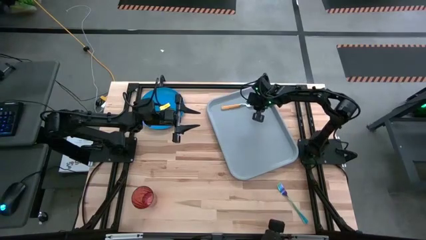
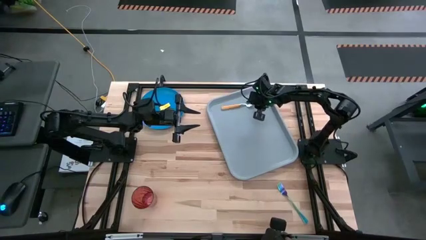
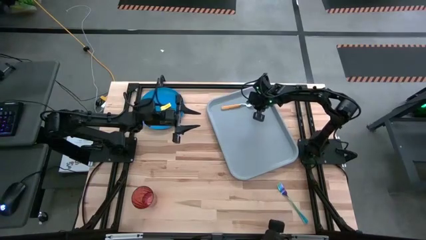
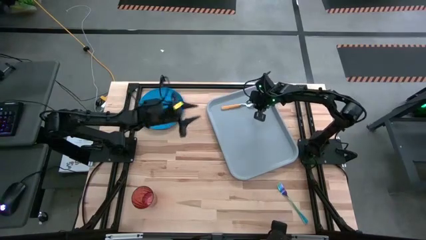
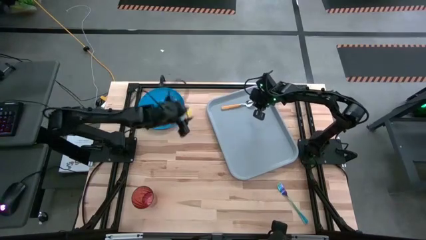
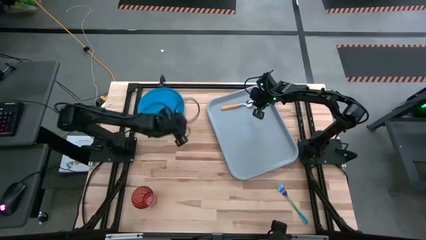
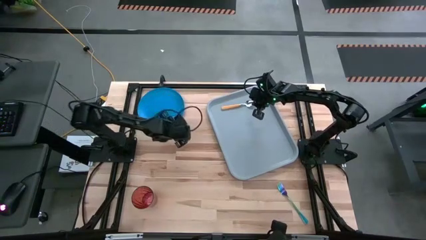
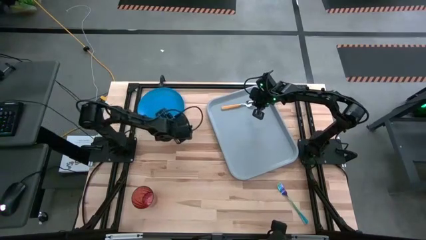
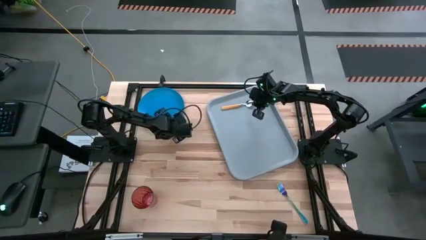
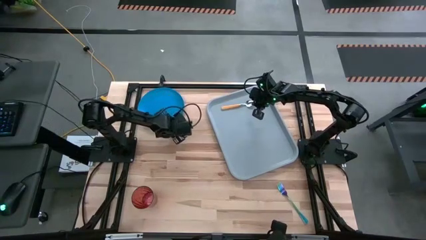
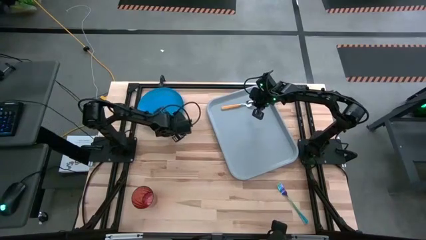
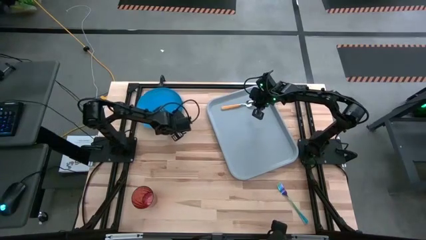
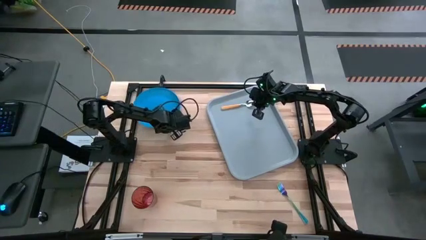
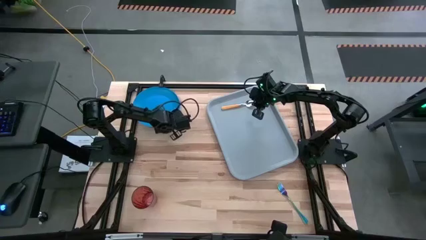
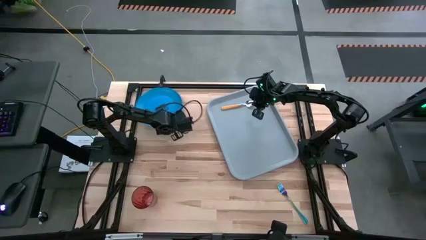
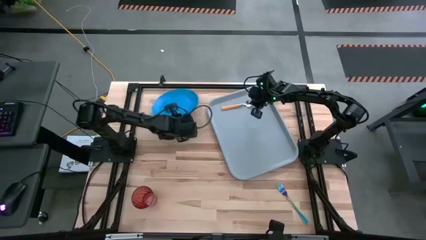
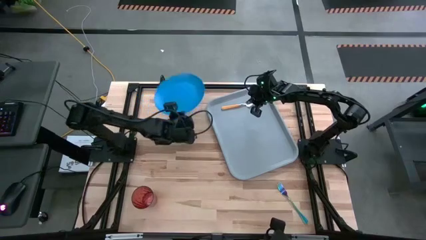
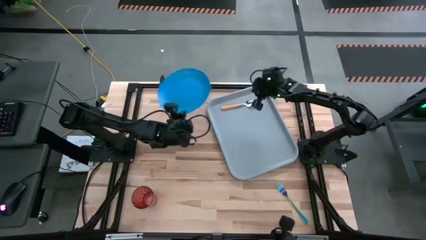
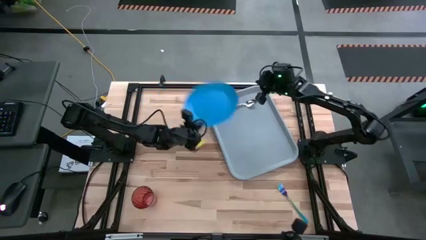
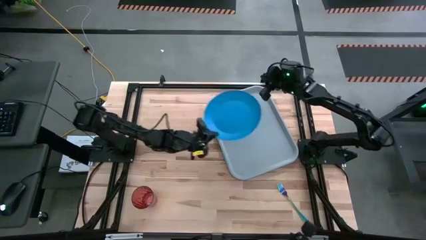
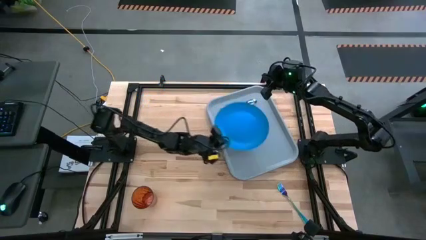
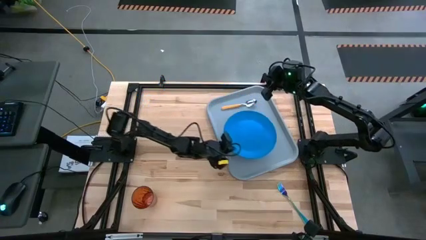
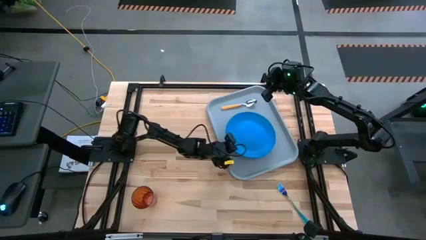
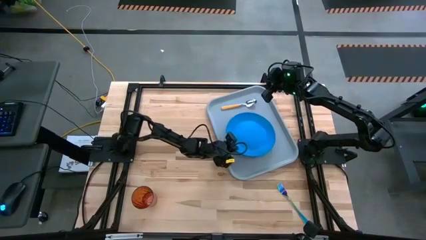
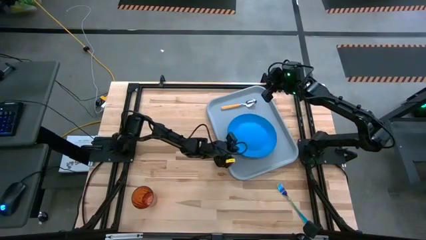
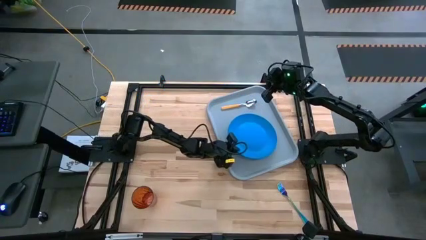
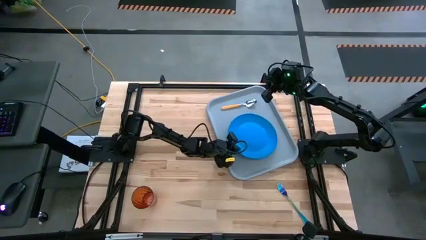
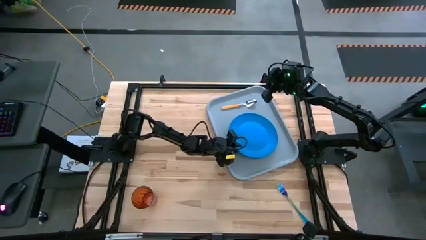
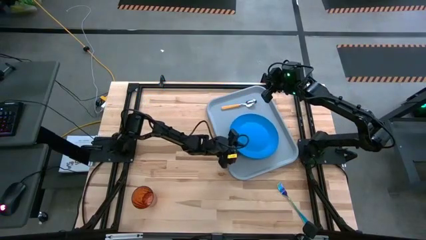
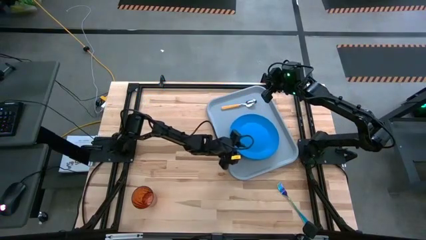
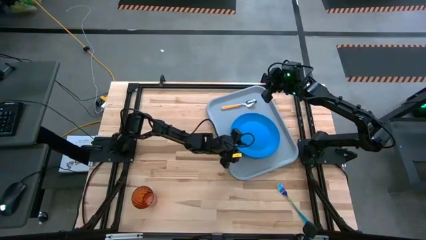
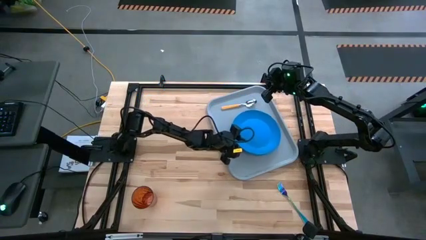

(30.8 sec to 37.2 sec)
Task: Pick and place plate/cup/fork/spoon on tray
Put the blue plate on the gray serving tray

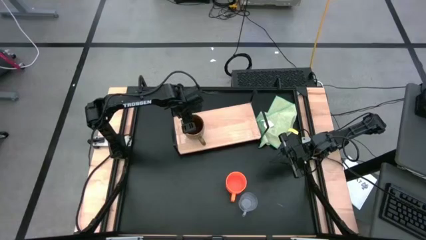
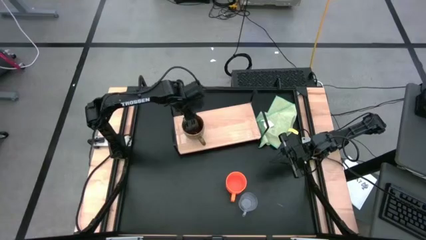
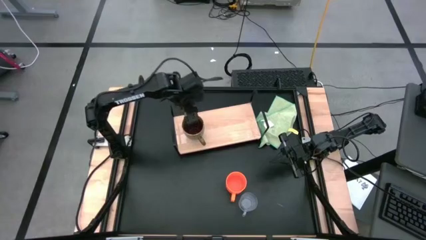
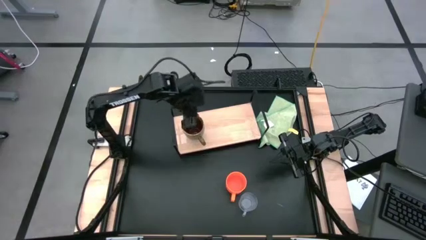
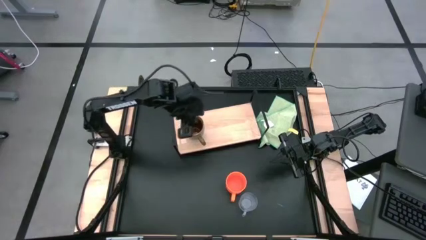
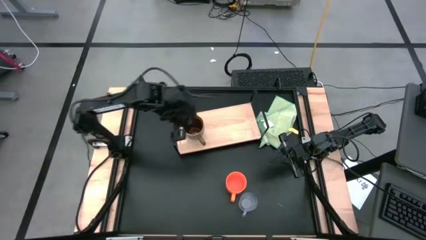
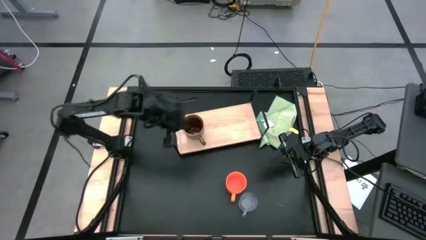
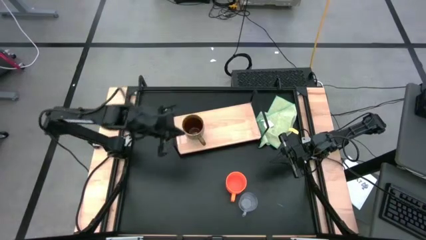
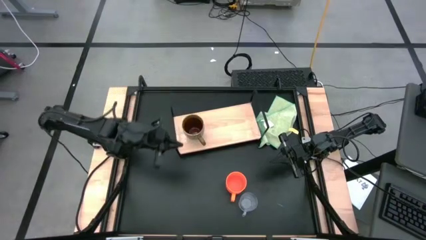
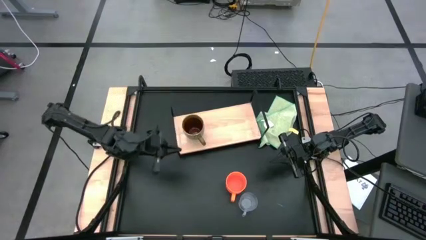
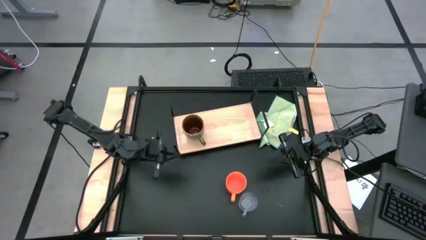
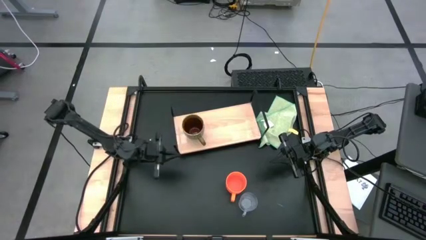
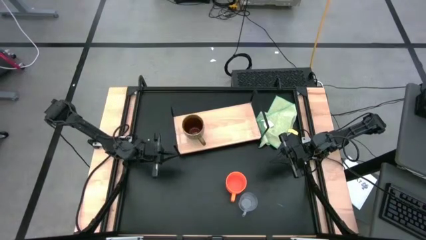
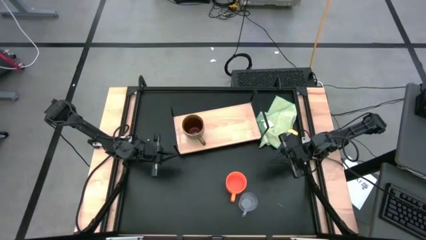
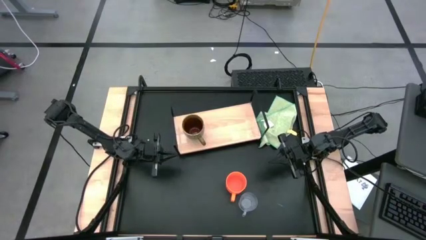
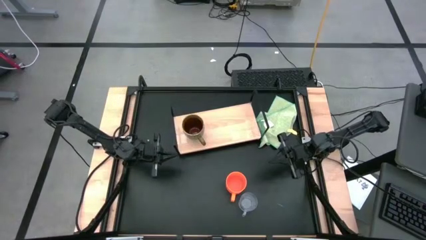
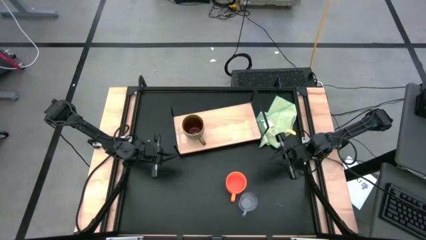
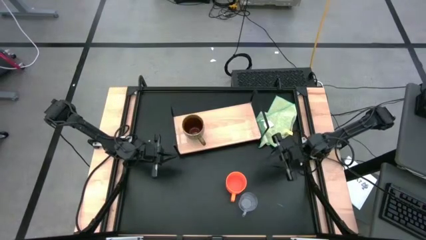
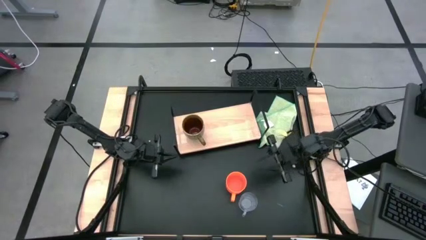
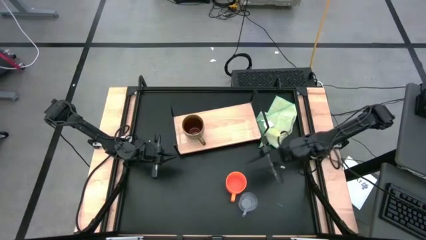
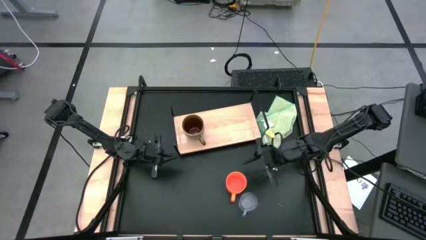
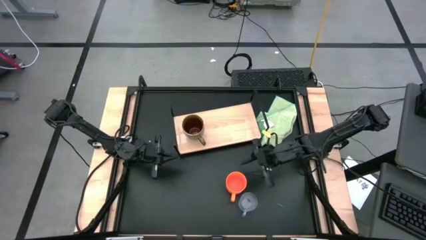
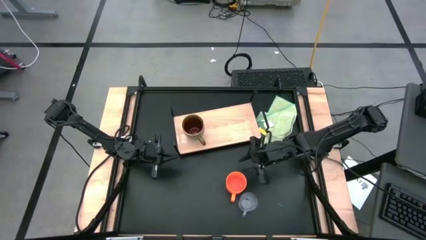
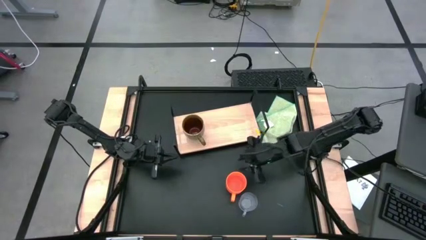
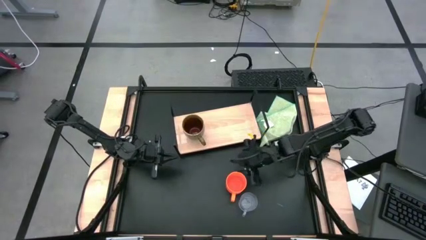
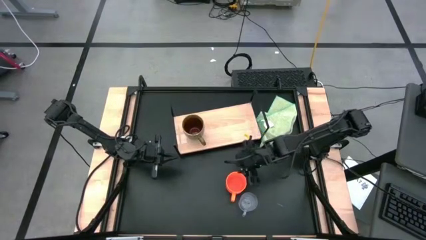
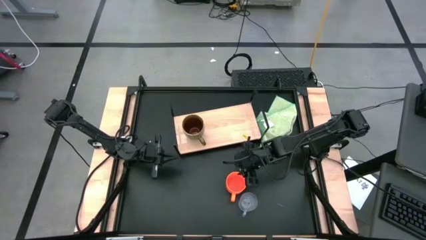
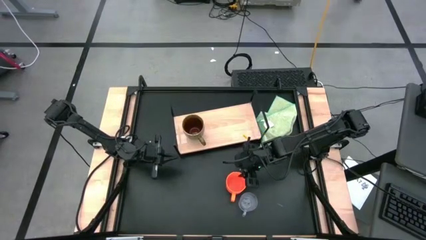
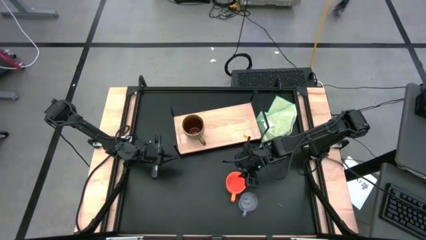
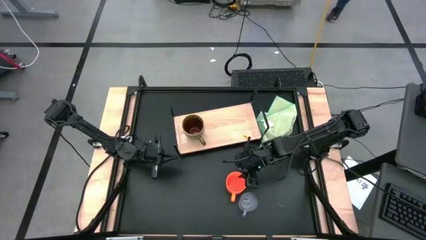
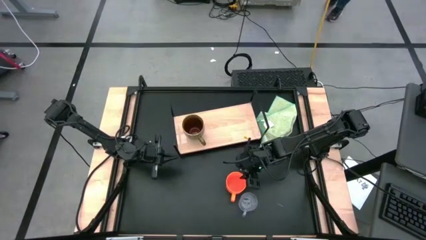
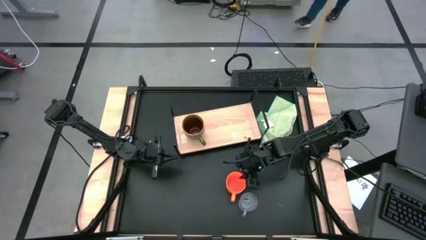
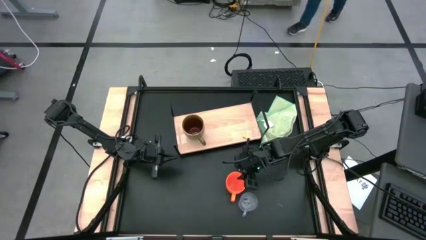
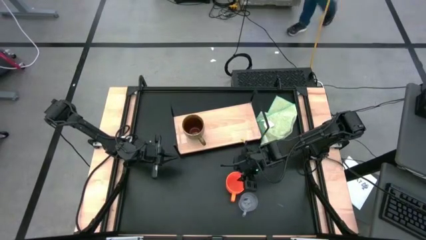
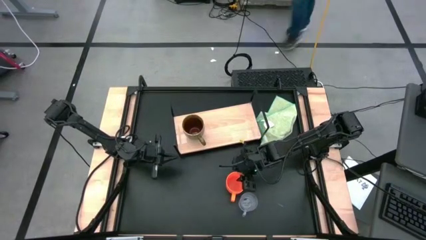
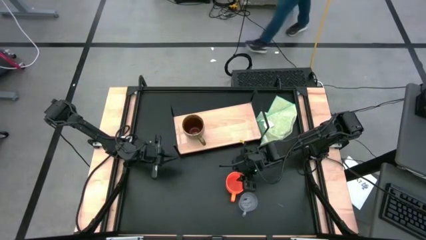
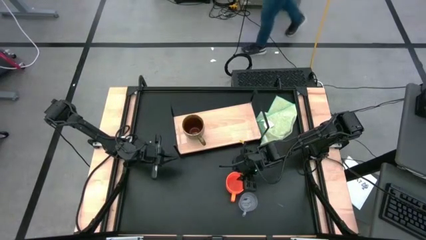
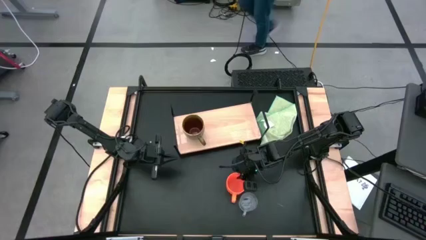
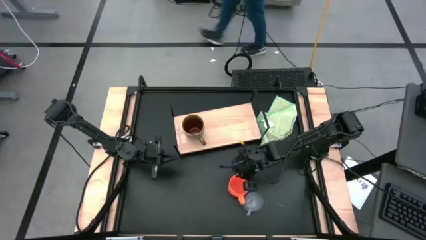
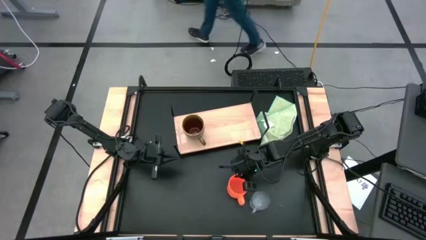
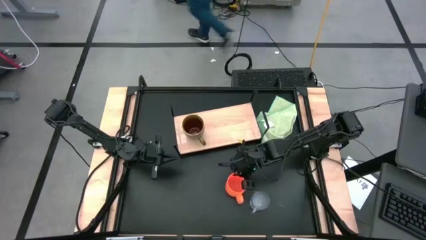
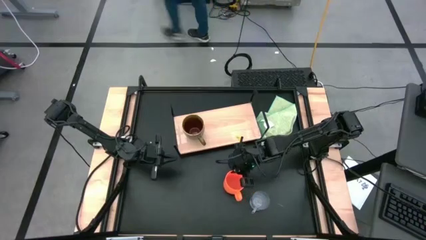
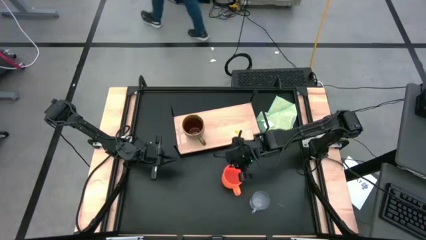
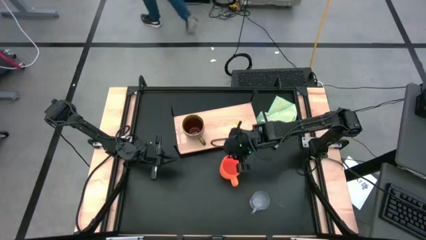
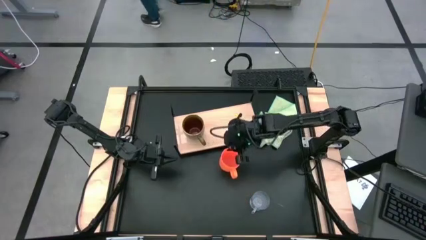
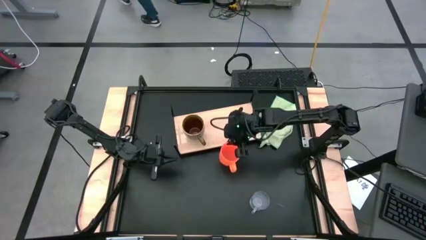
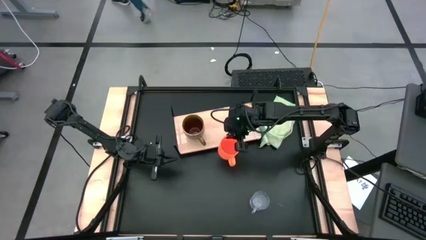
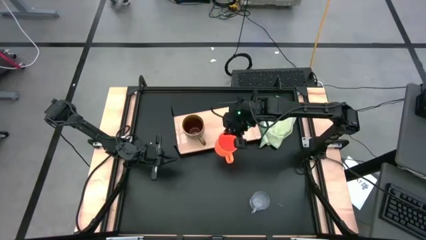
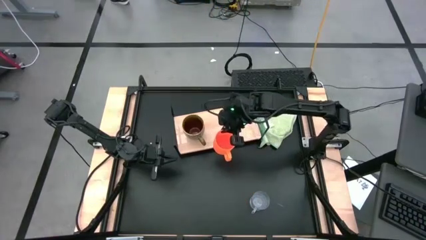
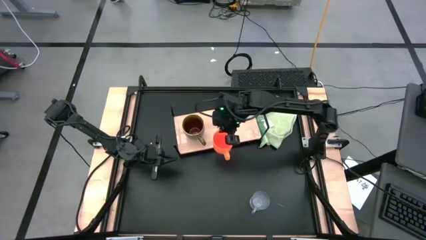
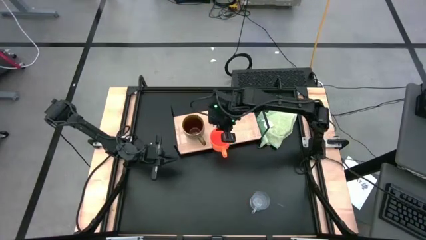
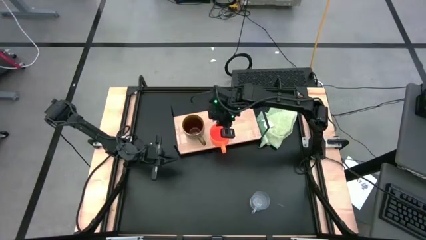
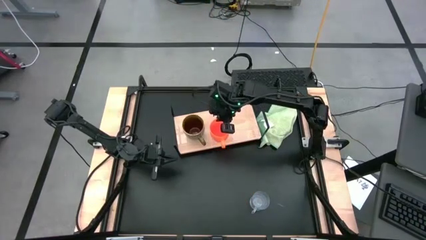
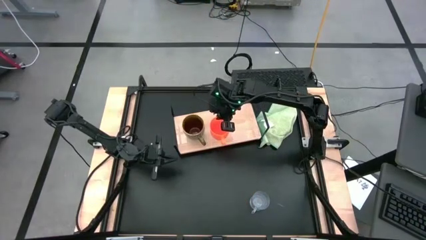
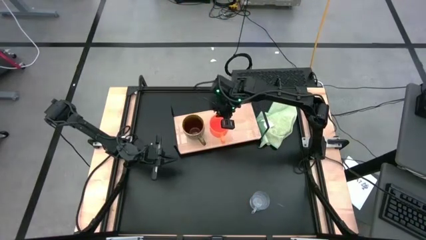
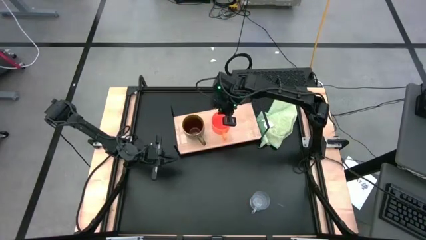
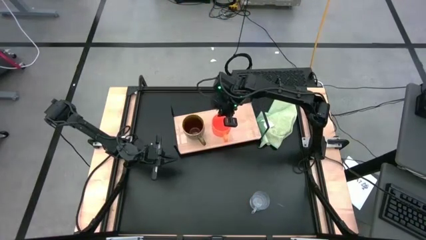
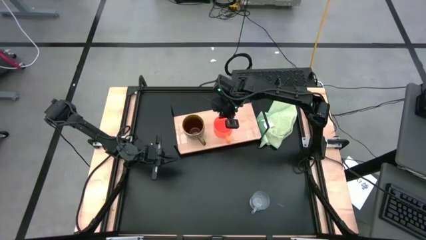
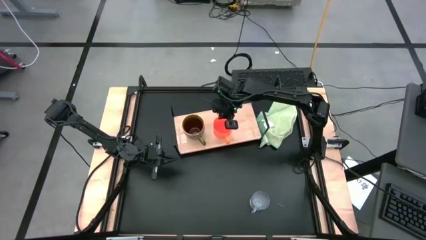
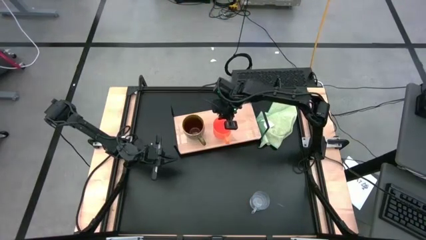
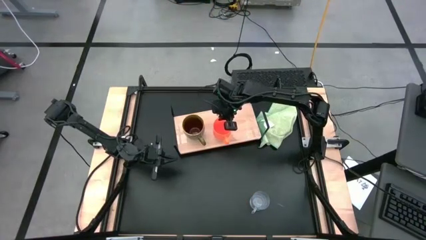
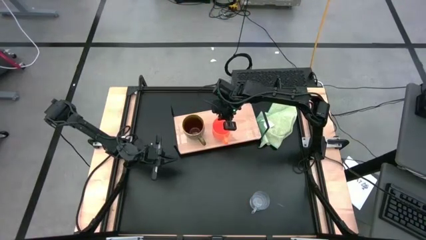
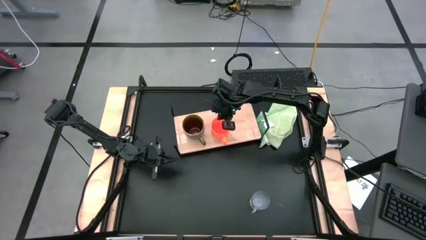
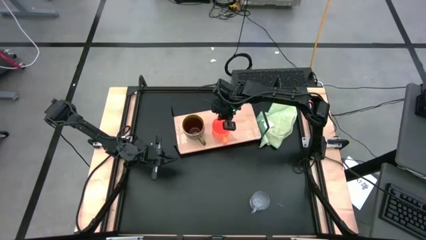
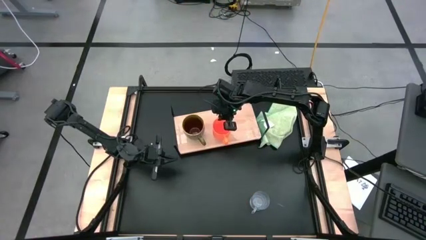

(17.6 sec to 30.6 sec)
Task: Stack small to large cups/mugs on shelf
Put the orange mug on the shelf
